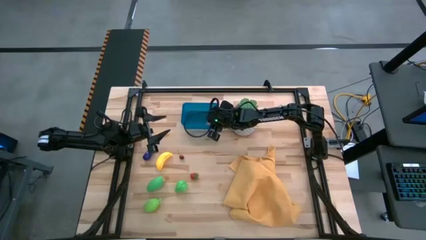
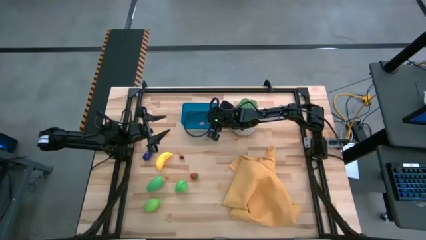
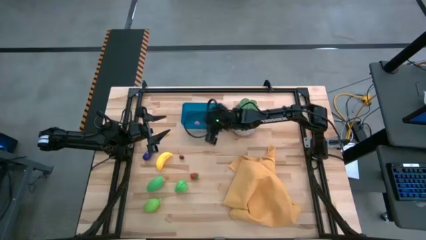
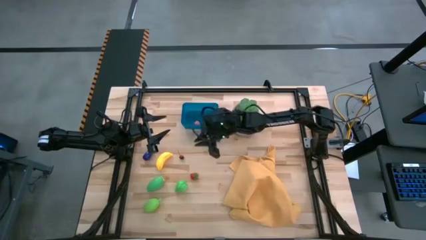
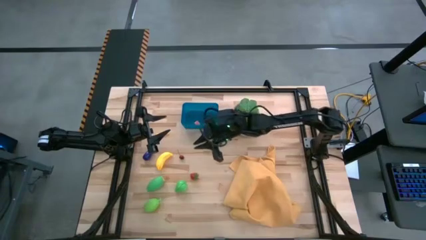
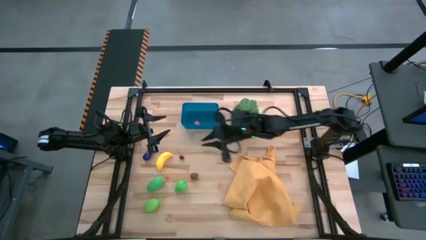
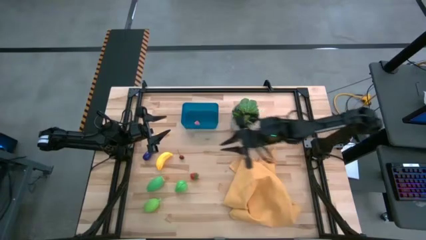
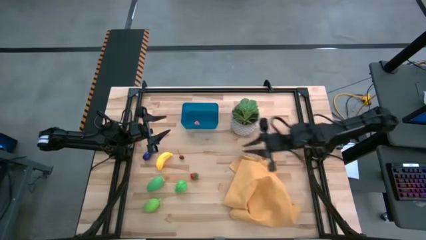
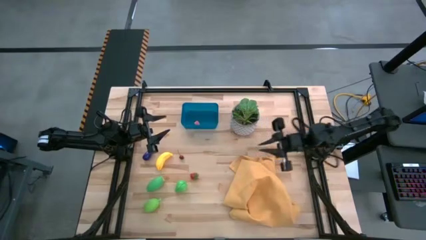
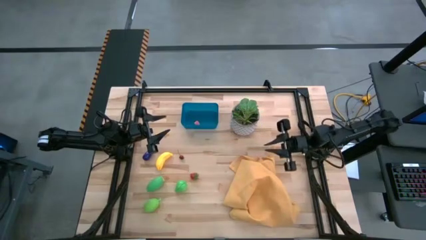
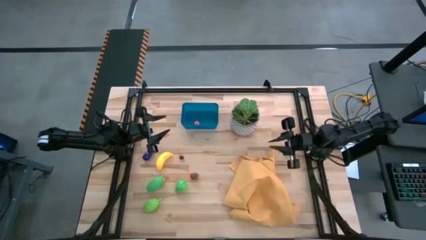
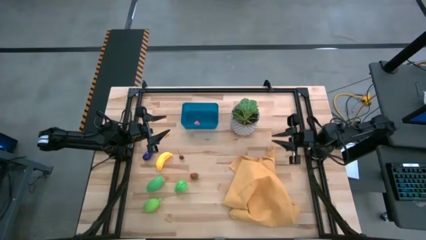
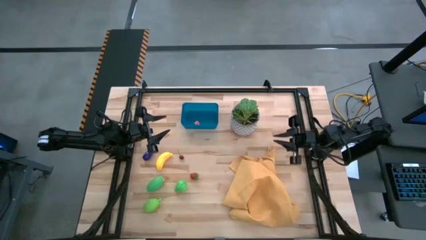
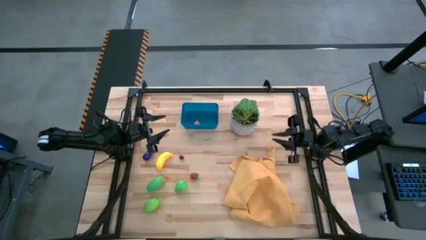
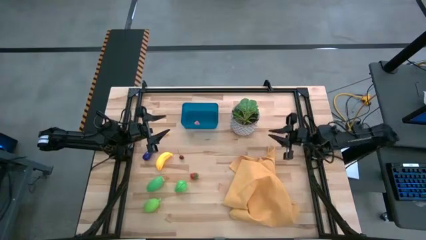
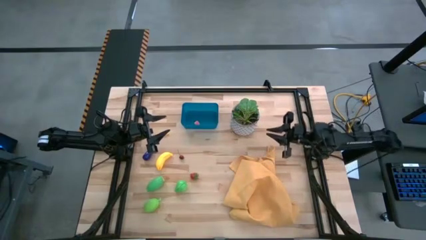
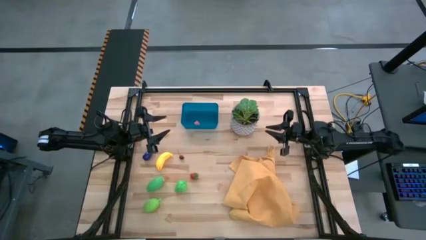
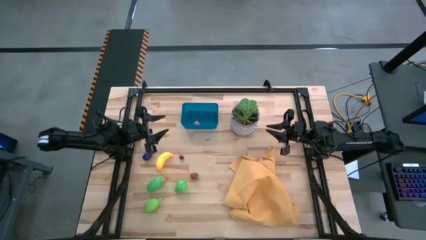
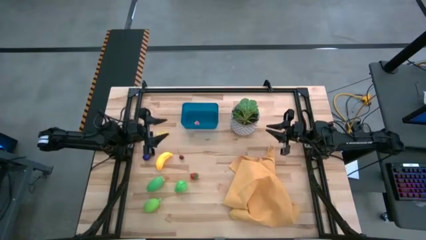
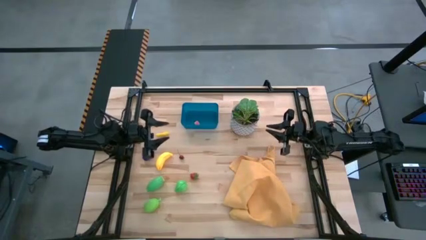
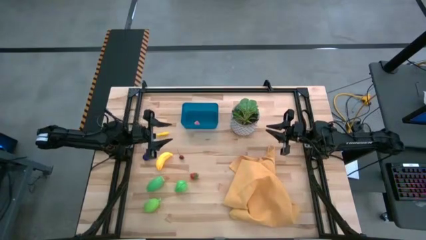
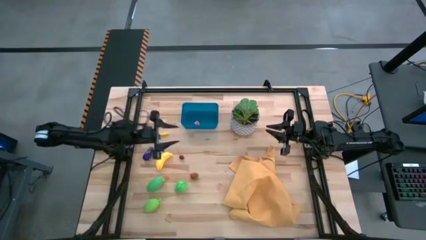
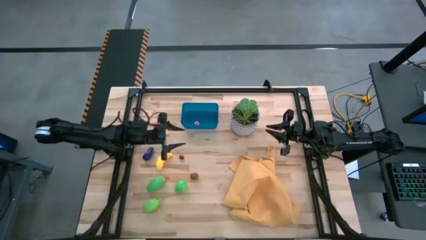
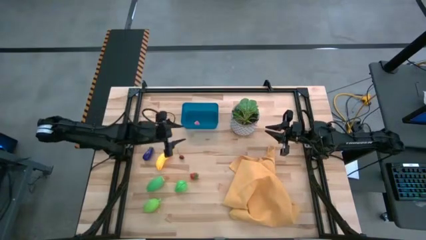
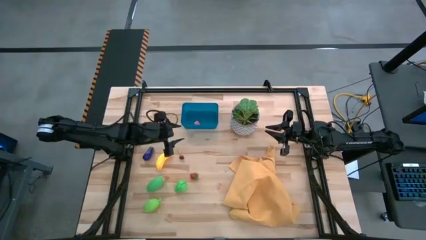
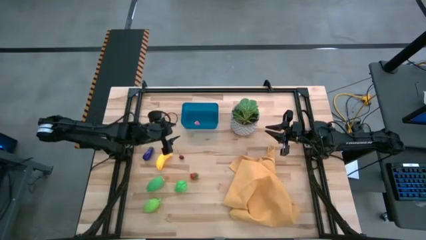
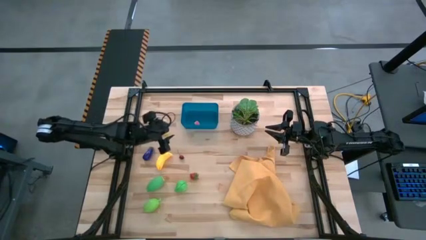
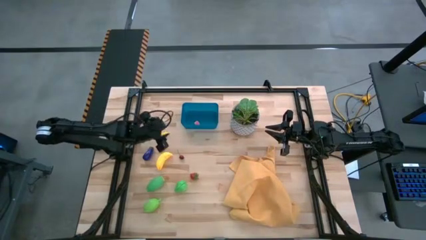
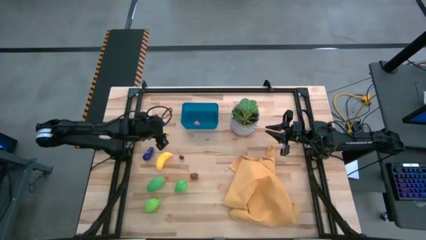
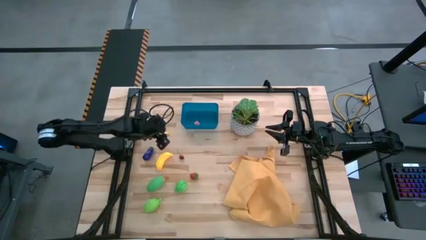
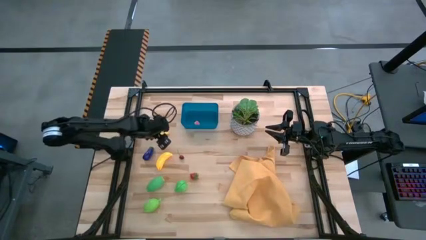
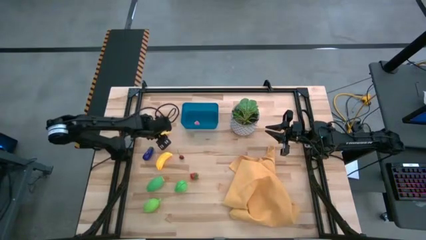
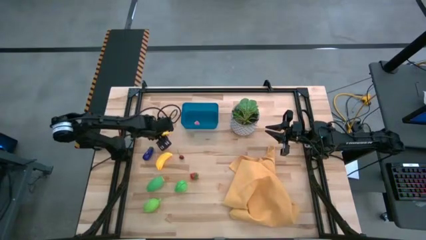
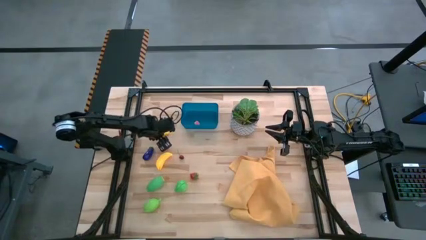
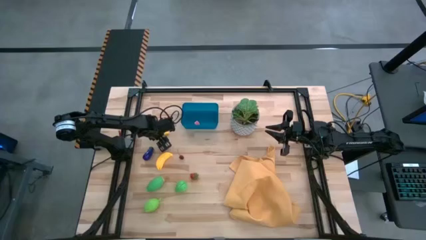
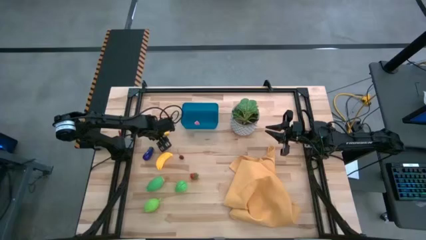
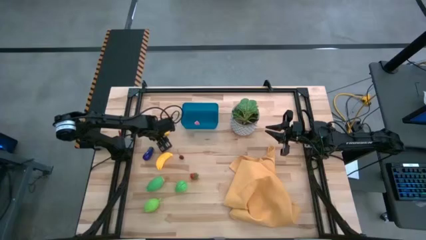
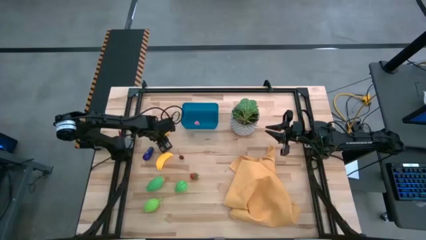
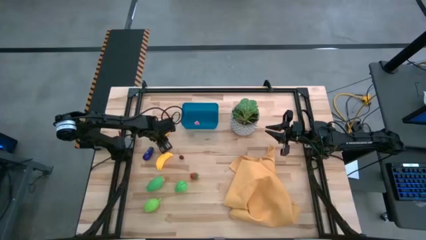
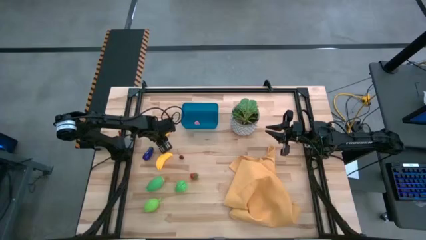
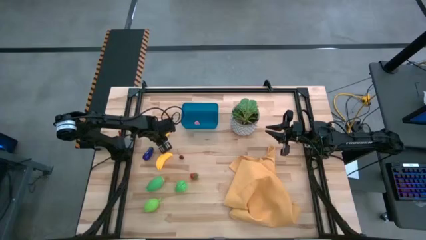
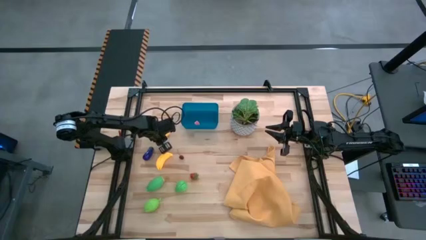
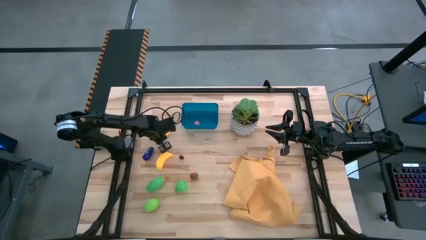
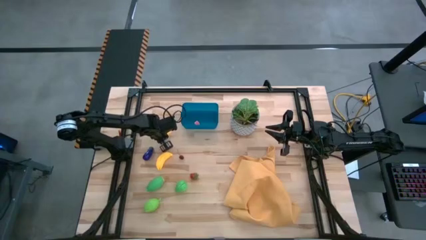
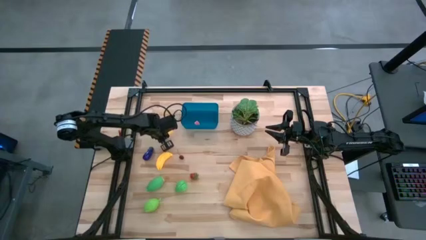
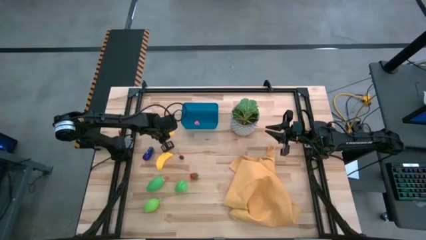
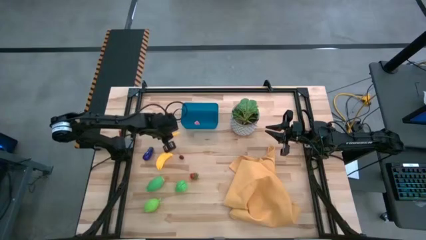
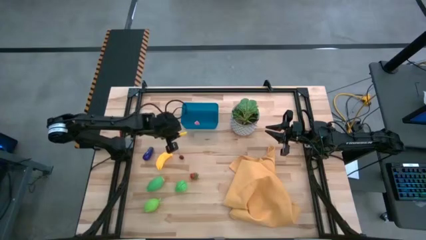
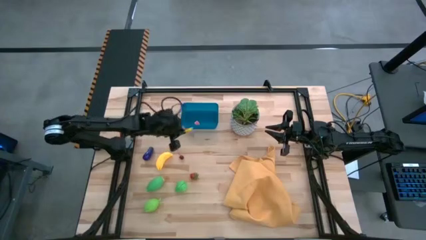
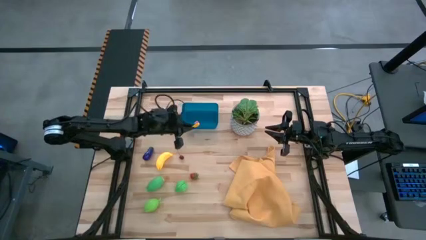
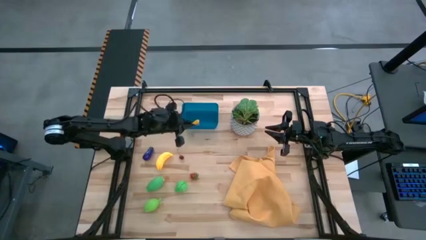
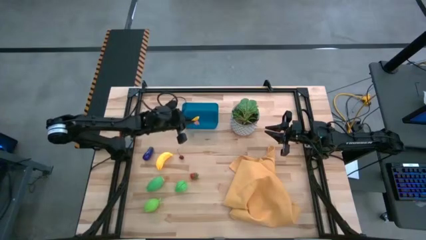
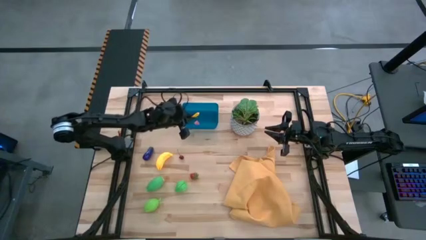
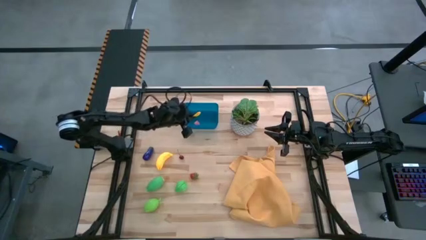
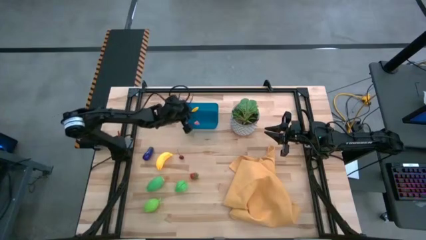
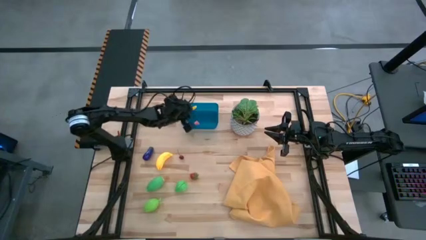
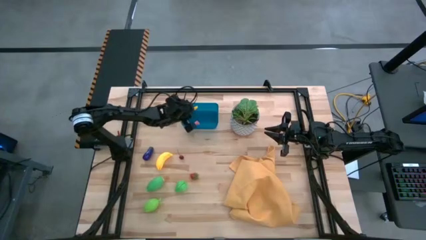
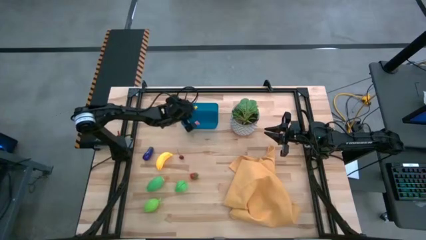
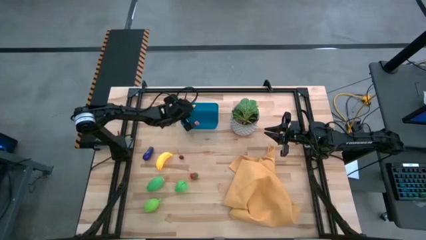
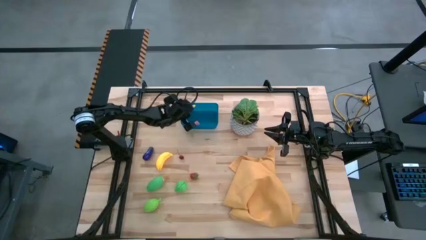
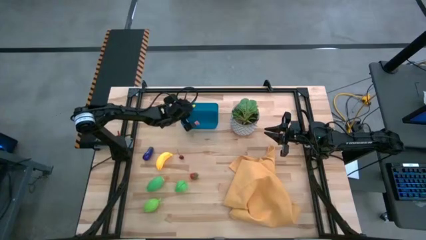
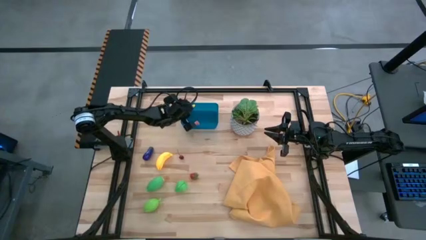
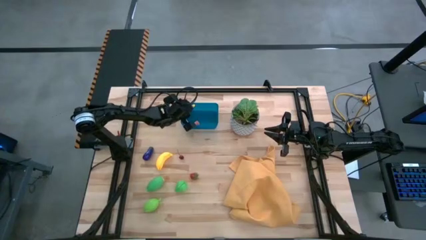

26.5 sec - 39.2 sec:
Task: Pick and placing Produce into tupperware
Put the yellow corn into the blue bin

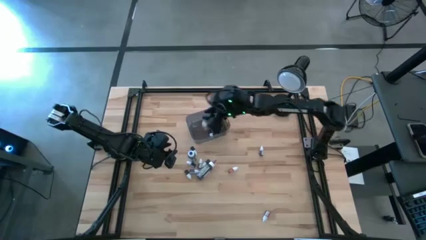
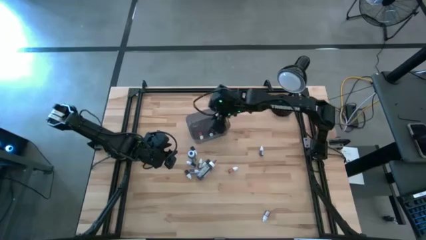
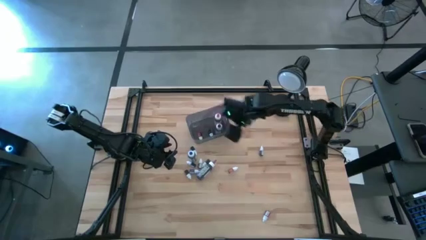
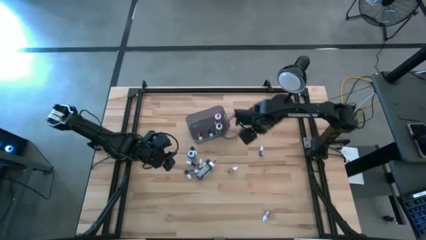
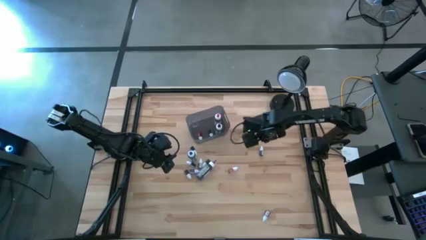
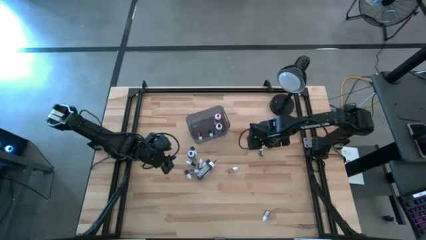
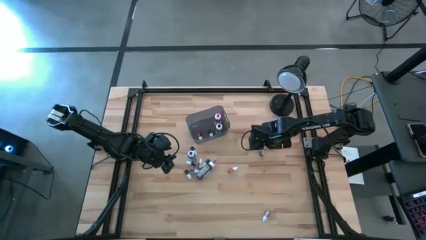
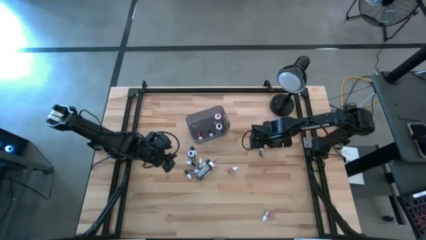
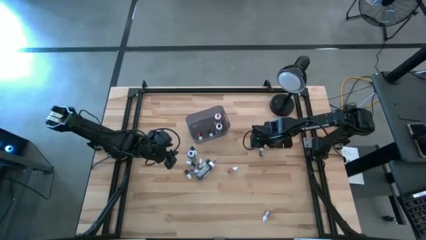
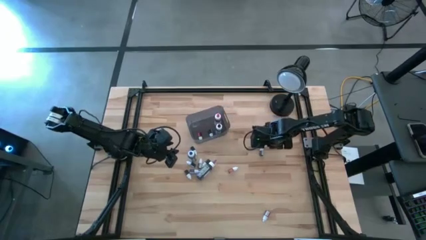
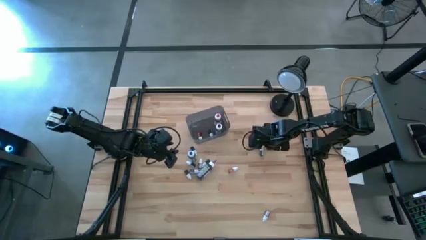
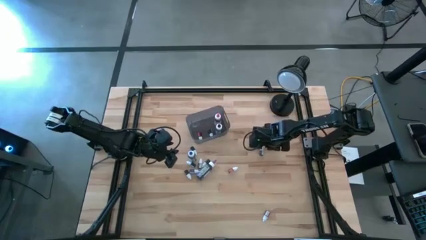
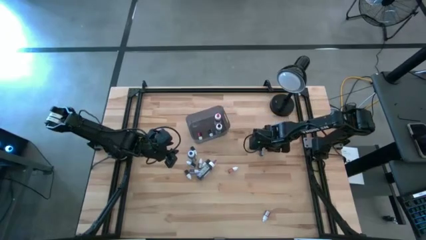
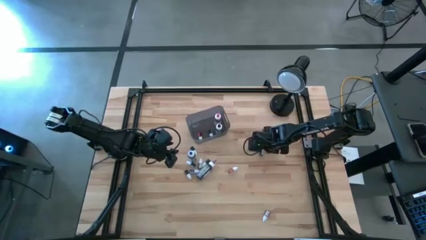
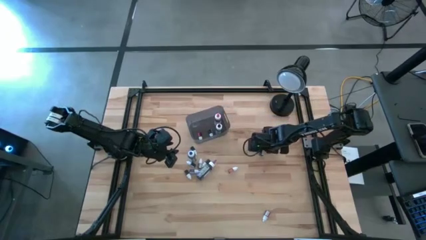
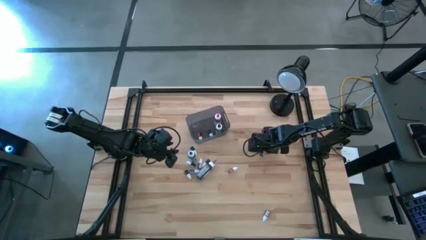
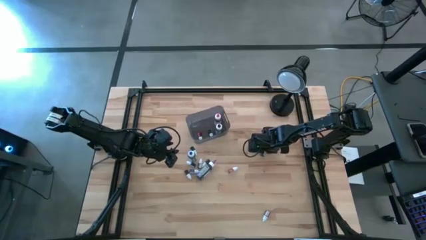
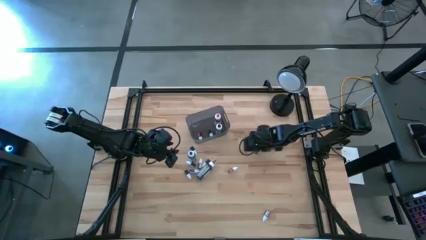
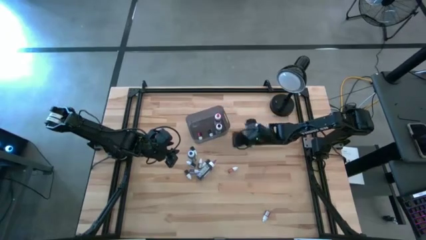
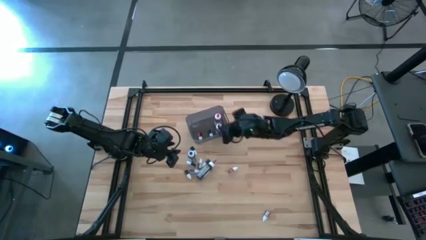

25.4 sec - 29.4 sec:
Task: Pick & Place food coloring
Put the small purple food coloring bottle into the gray bin
